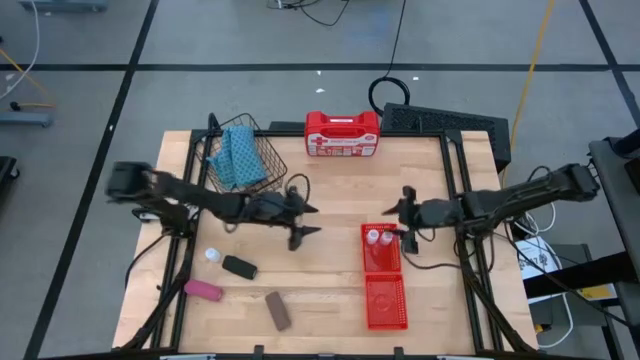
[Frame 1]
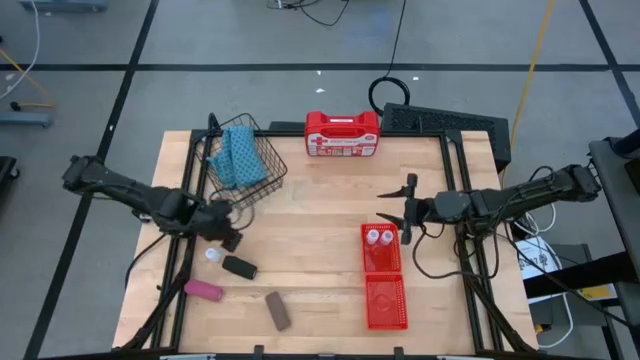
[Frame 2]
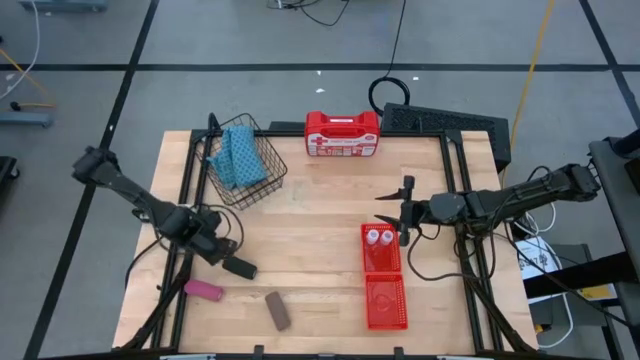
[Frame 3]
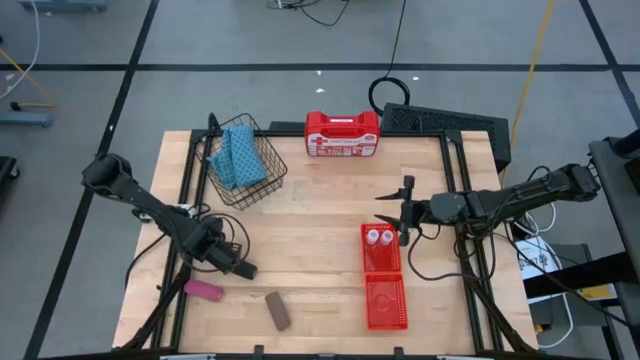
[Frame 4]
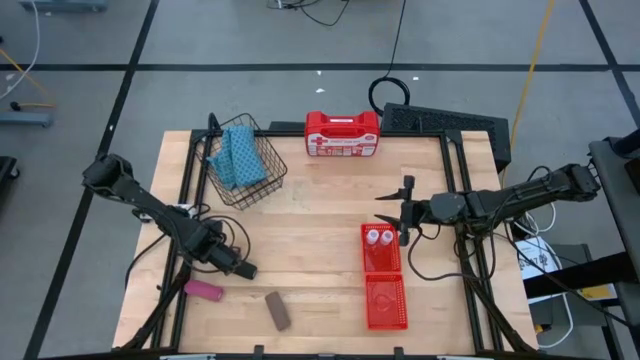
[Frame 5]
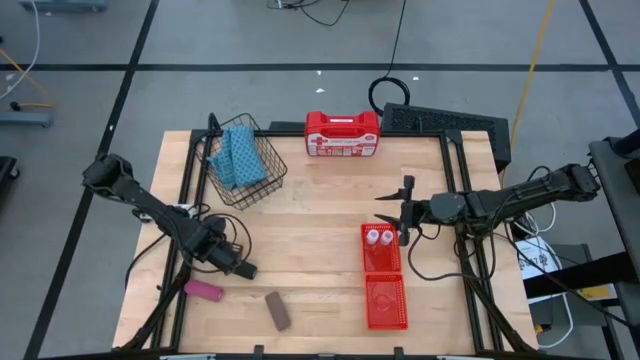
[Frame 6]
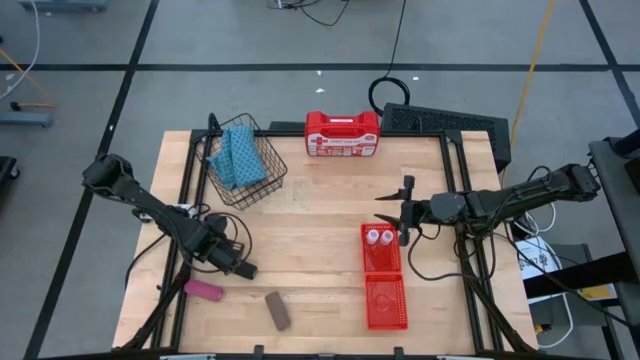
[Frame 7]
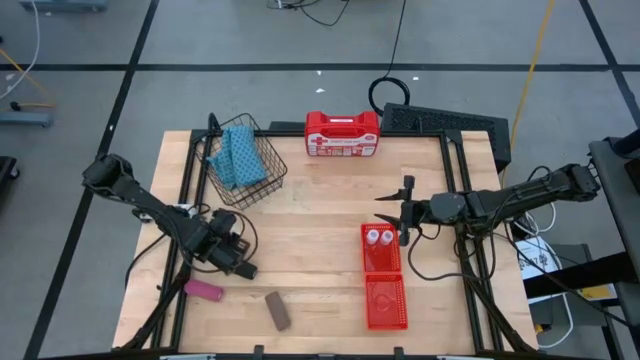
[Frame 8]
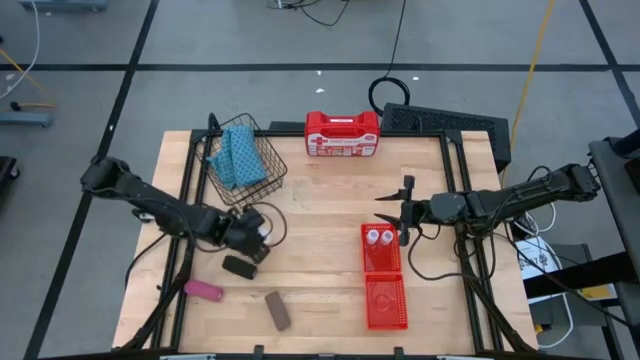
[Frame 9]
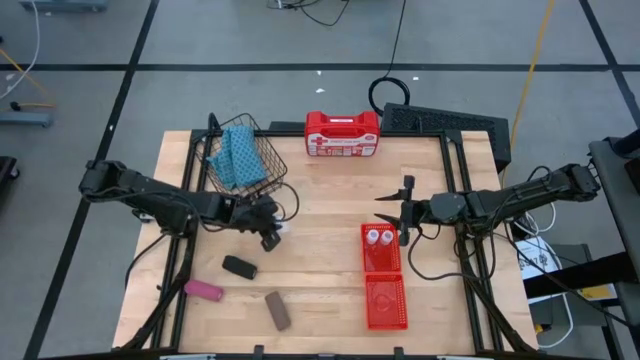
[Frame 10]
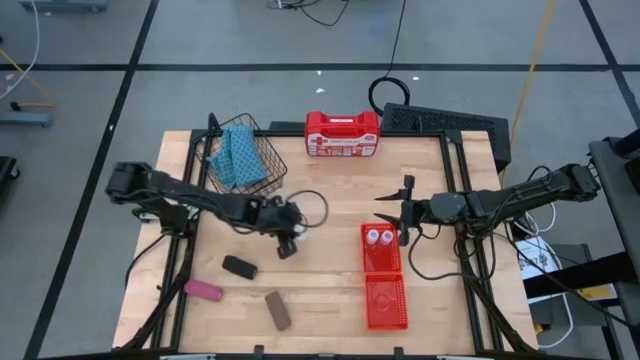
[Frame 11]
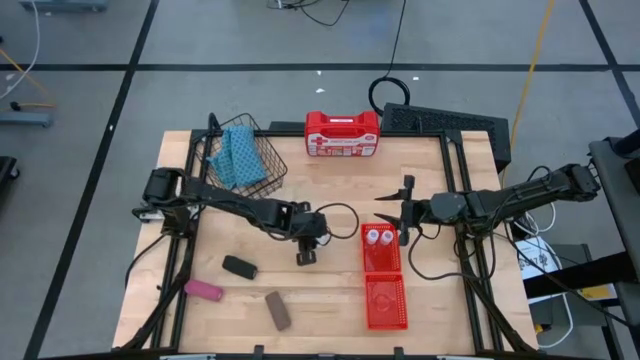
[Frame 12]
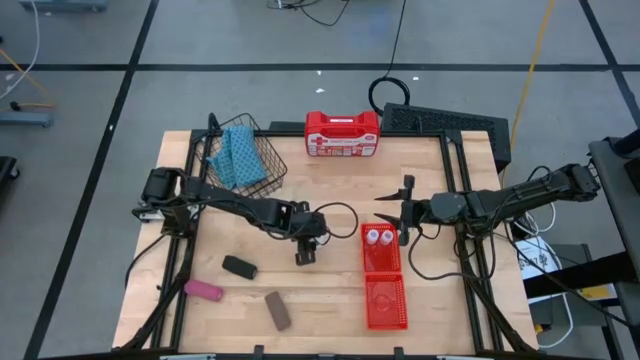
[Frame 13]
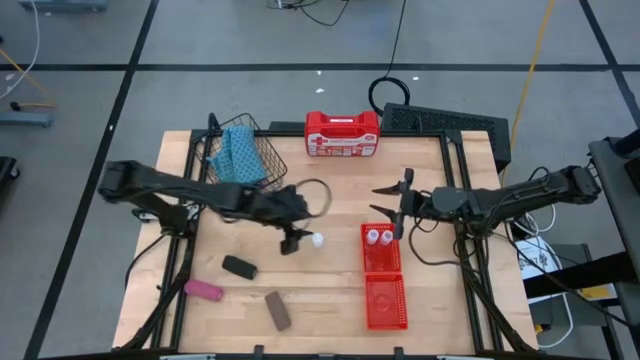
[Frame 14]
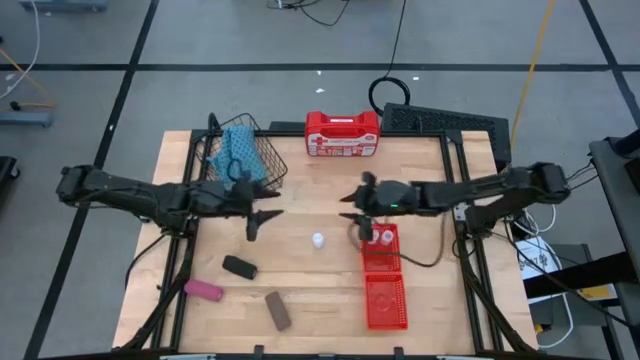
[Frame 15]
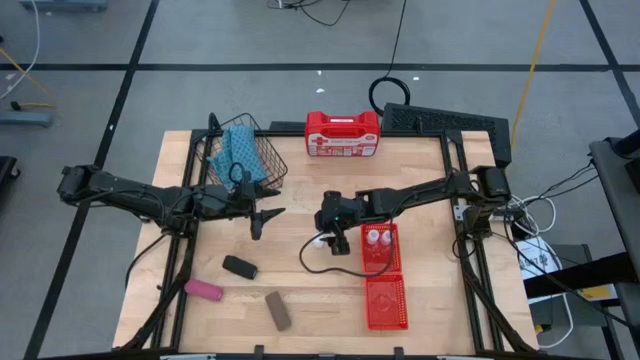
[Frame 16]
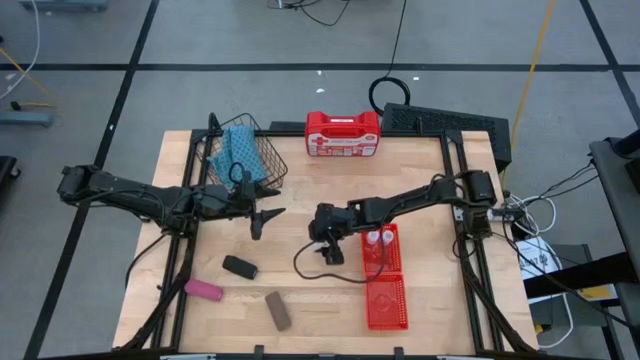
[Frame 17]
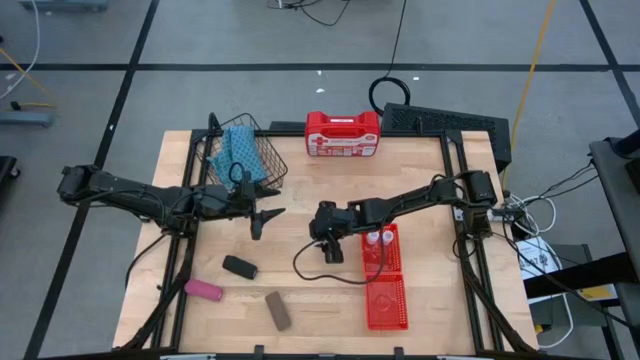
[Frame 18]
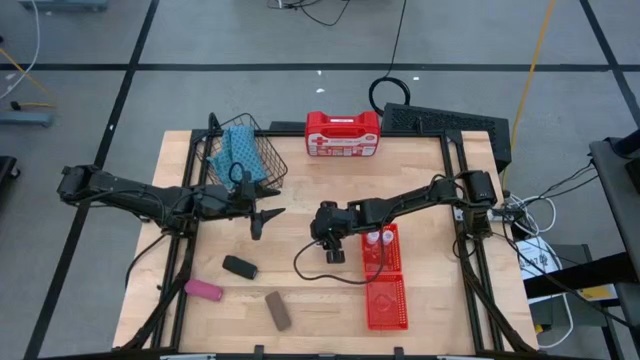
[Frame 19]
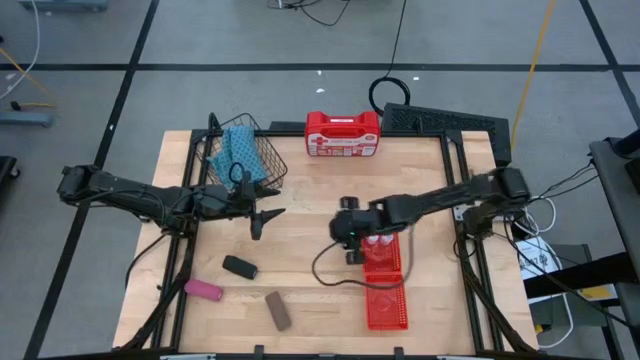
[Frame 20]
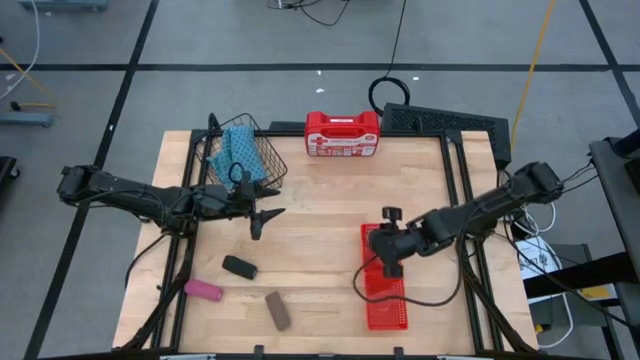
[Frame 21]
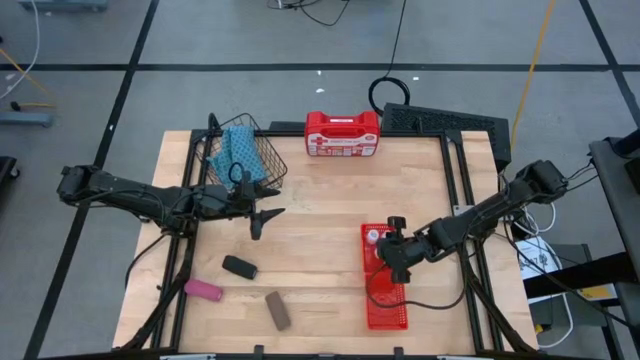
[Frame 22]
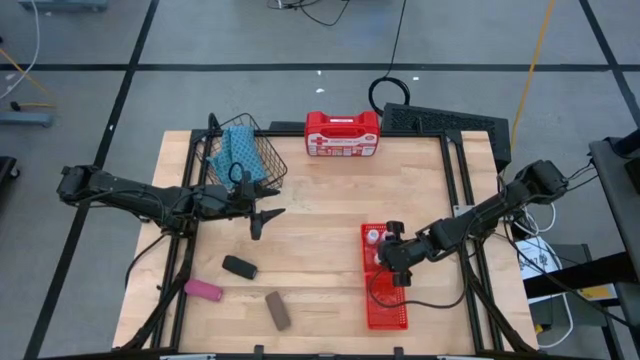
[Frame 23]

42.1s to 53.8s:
Task: Pick & Place Medicine items
Put the white pill bottle into the top red basket

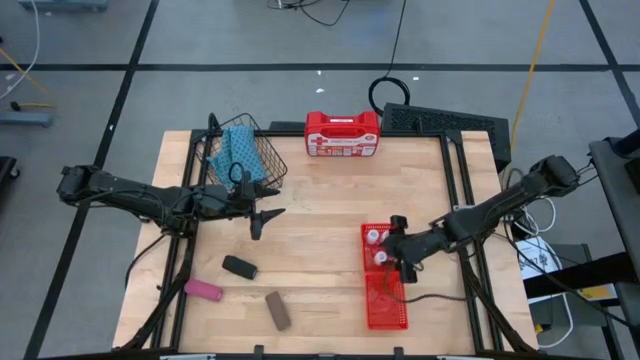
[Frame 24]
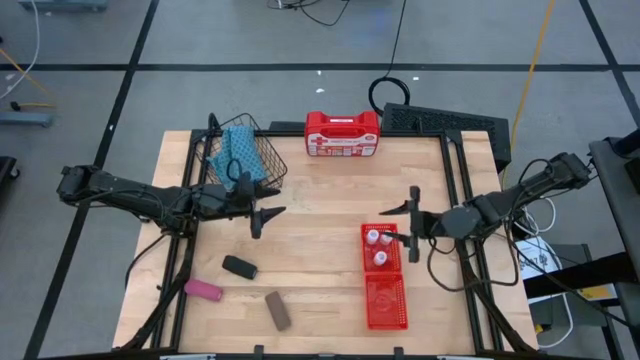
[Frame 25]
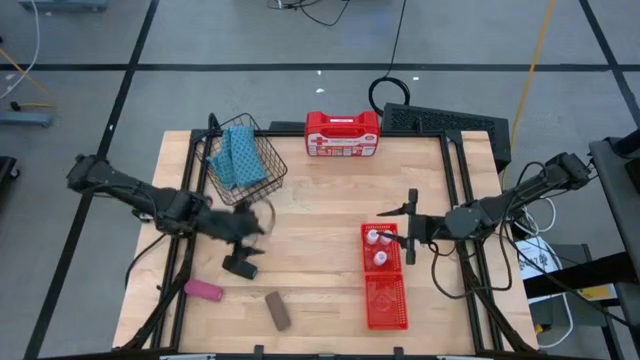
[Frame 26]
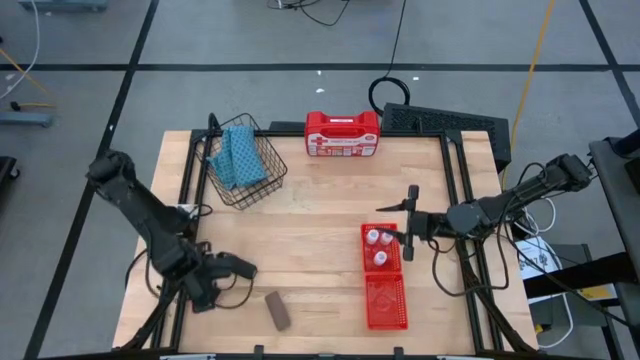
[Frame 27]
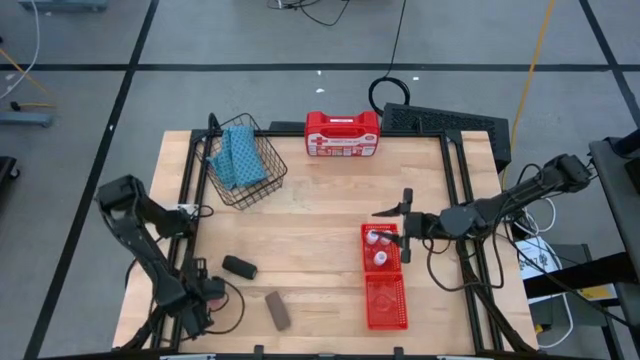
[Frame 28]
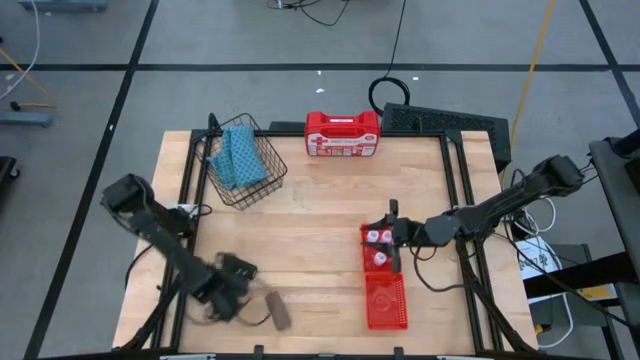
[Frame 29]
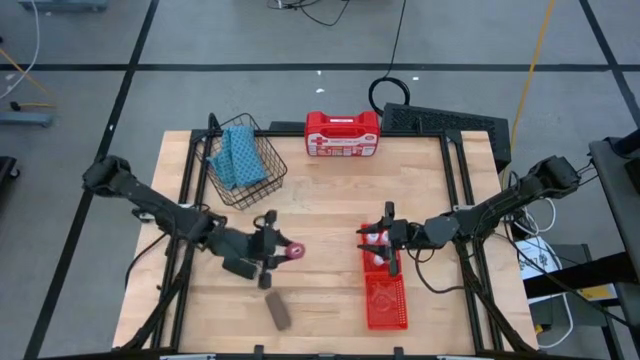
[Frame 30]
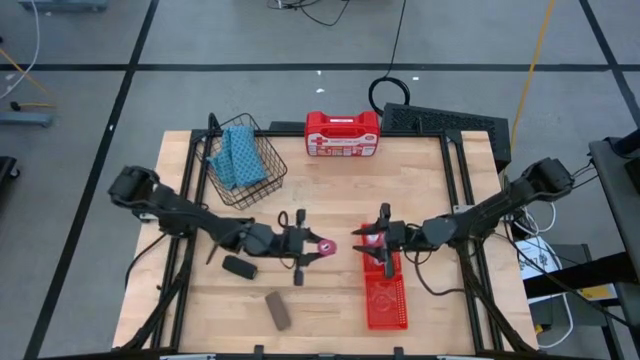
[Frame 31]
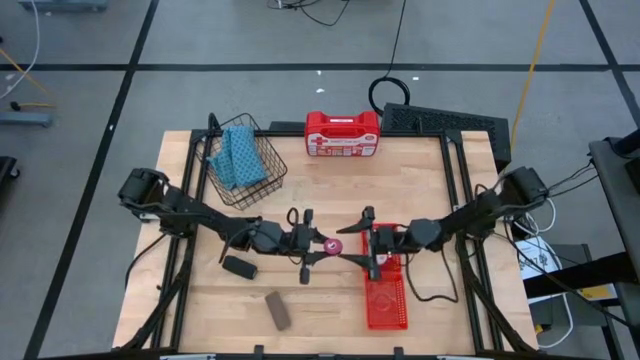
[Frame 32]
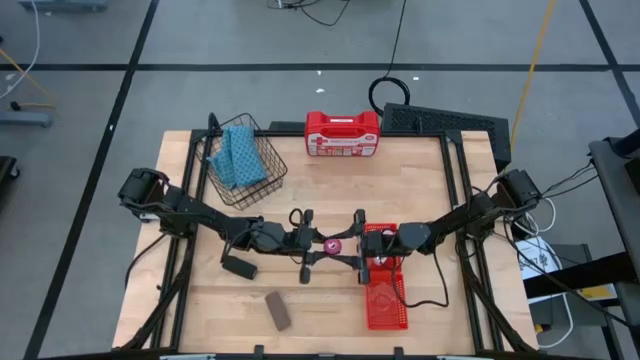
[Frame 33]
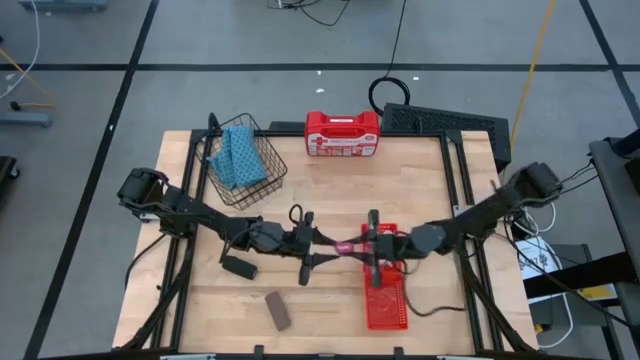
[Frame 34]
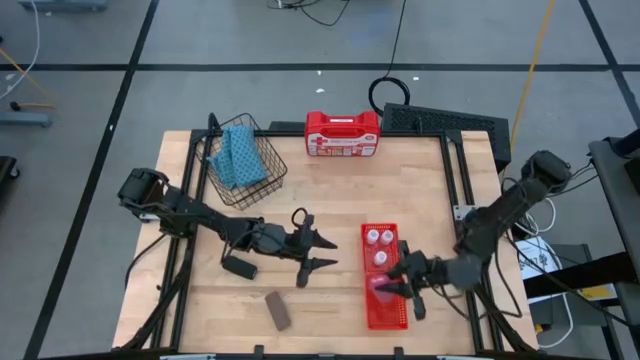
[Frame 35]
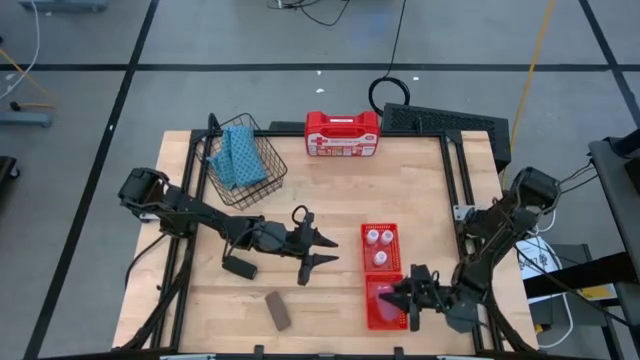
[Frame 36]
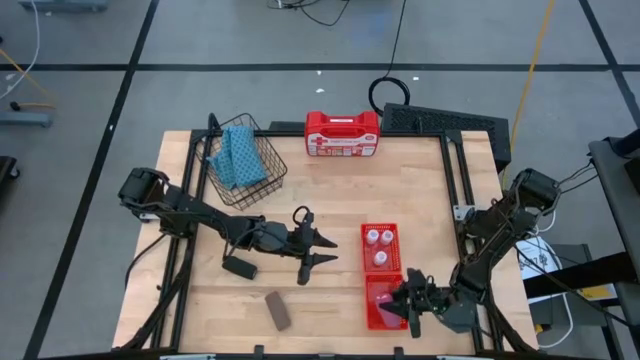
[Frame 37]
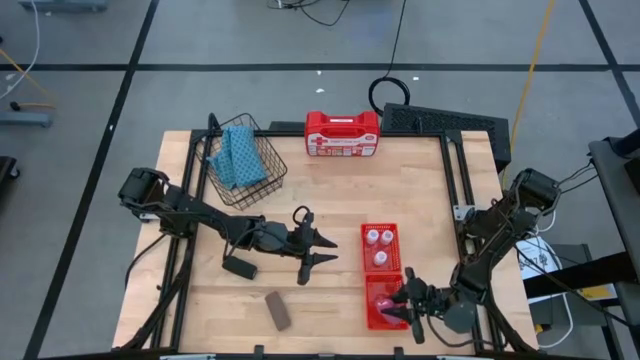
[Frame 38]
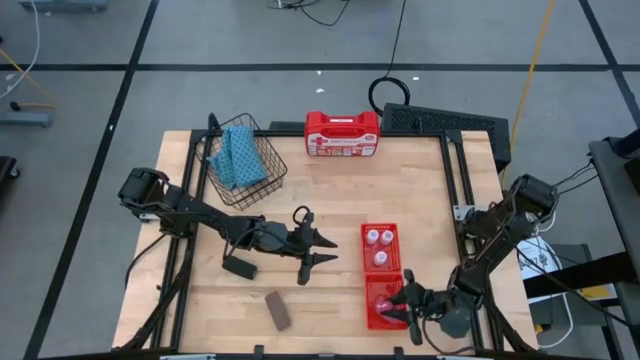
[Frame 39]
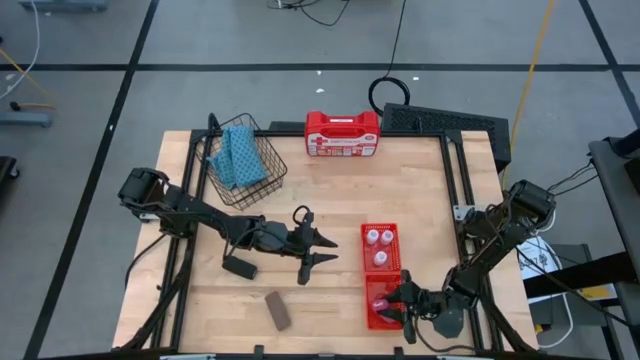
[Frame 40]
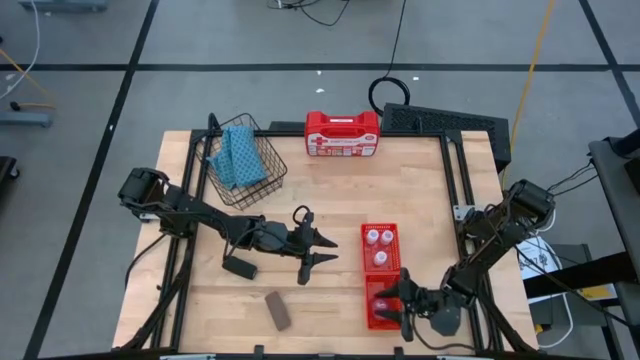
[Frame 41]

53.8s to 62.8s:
Put the pink bandage into the bottom red basket

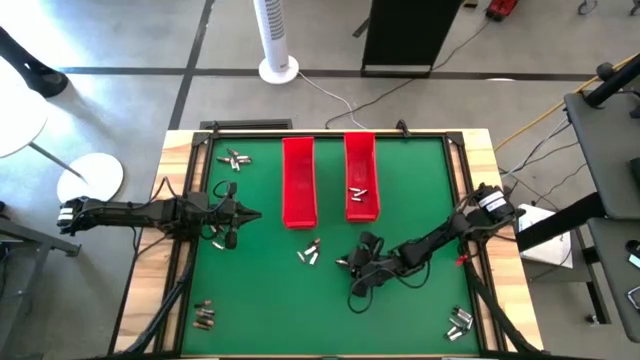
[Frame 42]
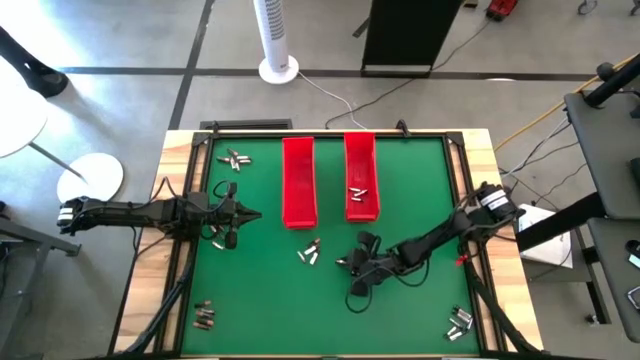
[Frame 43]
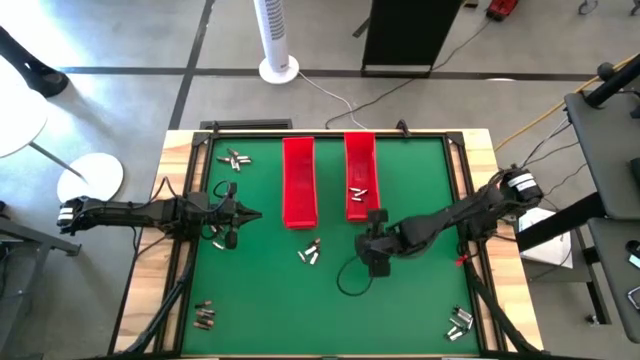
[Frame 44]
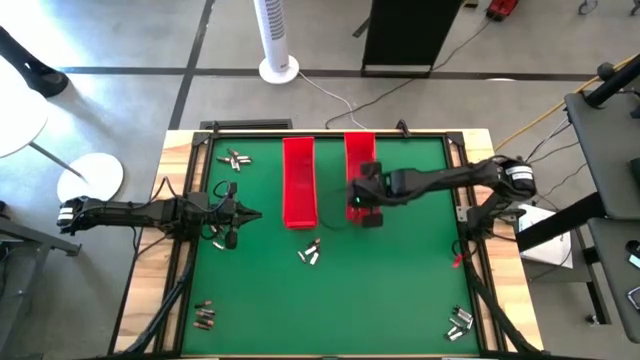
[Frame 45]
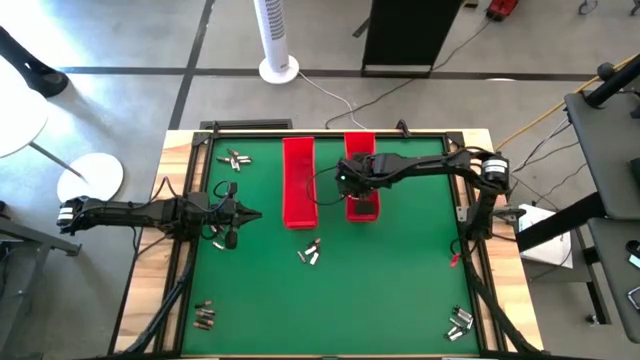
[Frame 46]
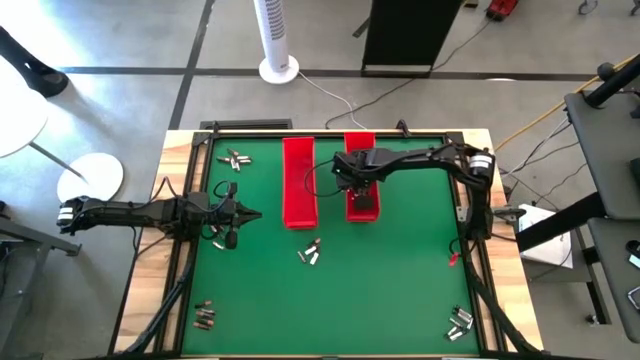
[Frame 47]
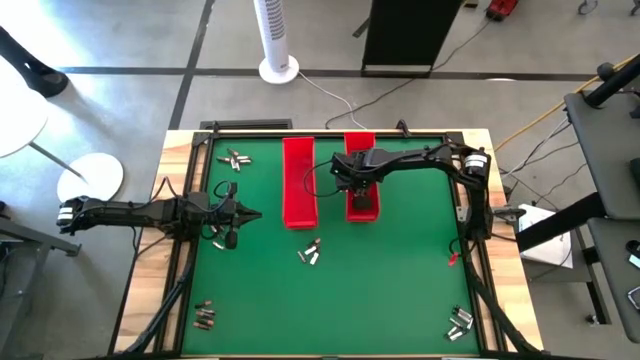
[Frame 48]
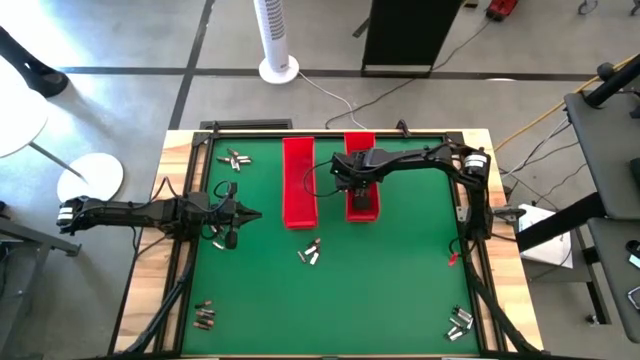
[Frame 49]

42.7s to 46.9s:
Task: Sort batteries
Put the silver battery into the right red bin
